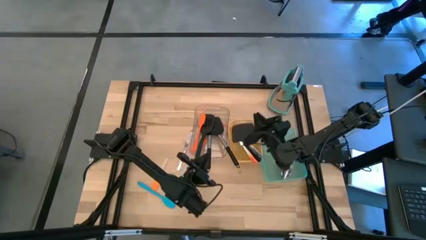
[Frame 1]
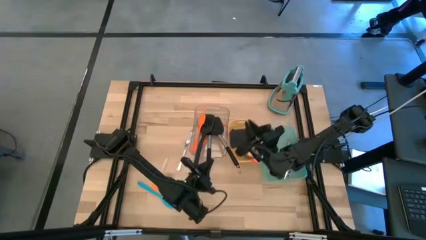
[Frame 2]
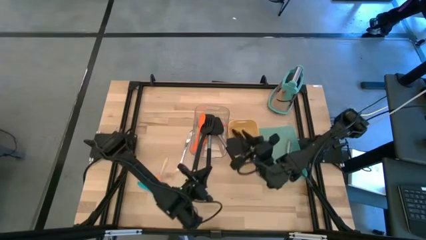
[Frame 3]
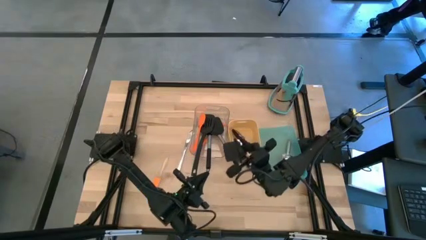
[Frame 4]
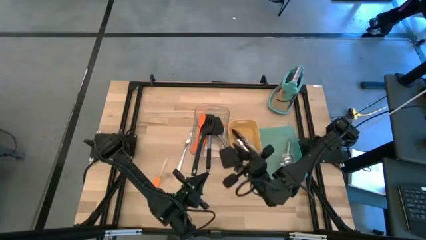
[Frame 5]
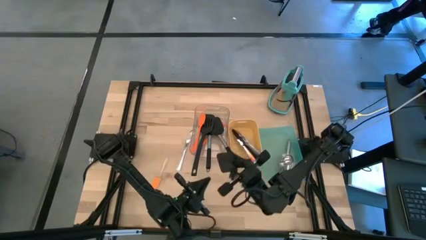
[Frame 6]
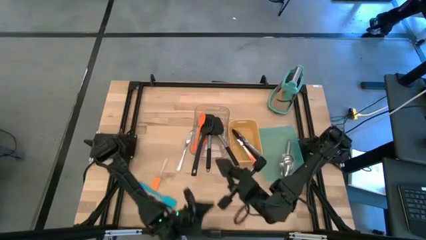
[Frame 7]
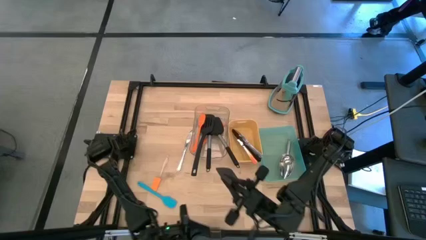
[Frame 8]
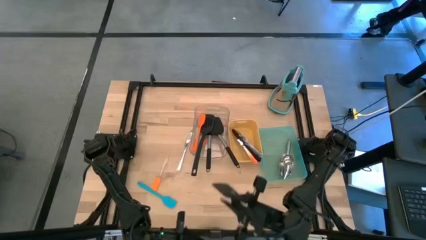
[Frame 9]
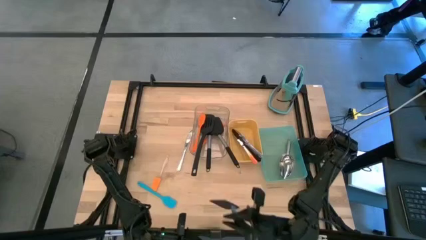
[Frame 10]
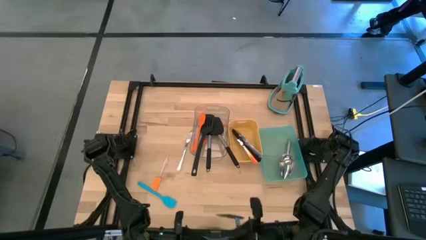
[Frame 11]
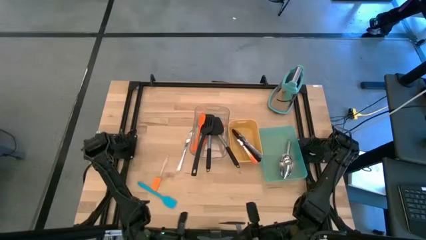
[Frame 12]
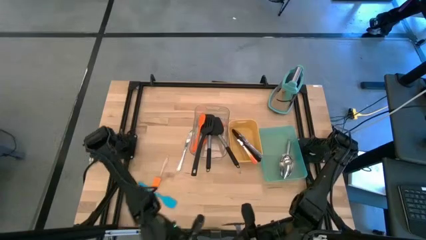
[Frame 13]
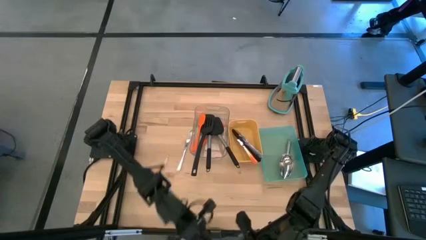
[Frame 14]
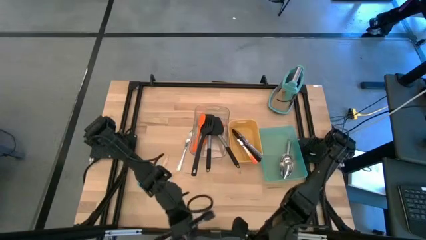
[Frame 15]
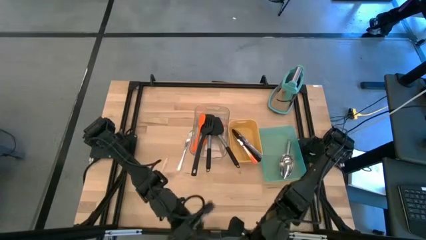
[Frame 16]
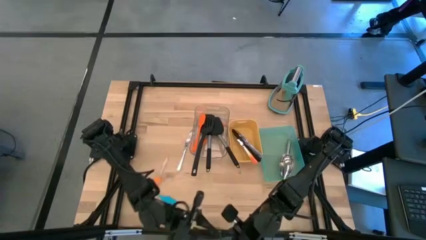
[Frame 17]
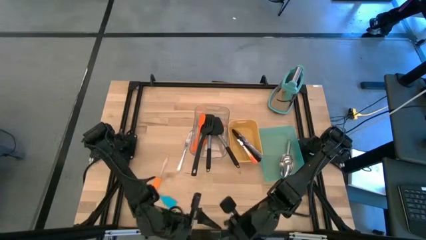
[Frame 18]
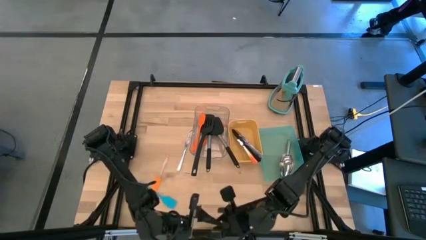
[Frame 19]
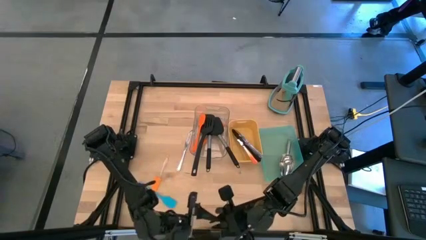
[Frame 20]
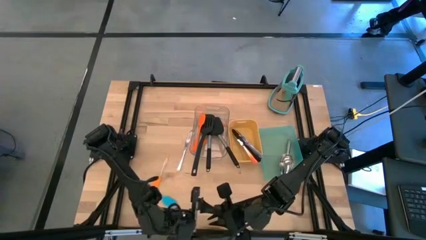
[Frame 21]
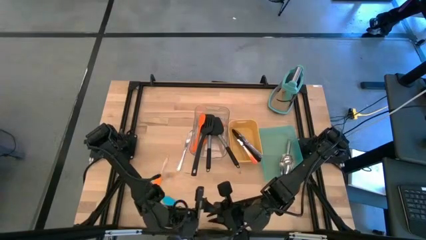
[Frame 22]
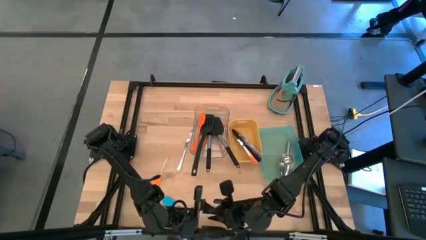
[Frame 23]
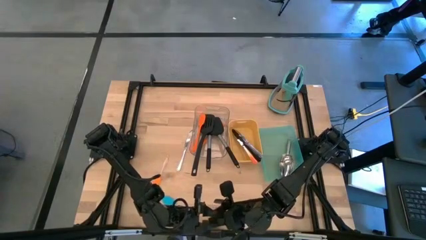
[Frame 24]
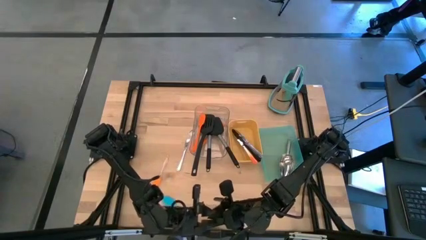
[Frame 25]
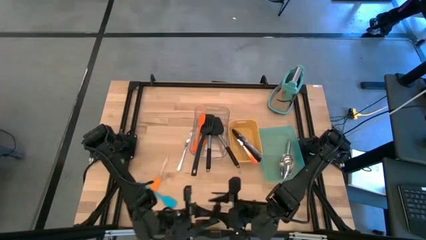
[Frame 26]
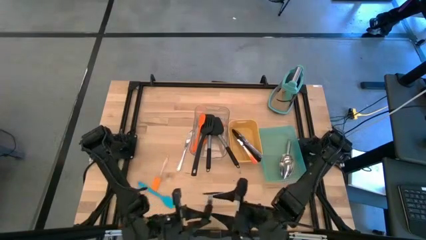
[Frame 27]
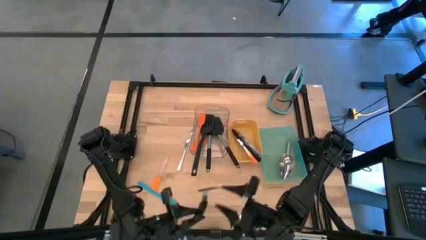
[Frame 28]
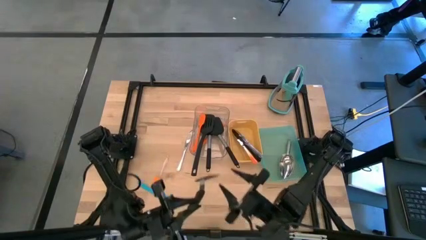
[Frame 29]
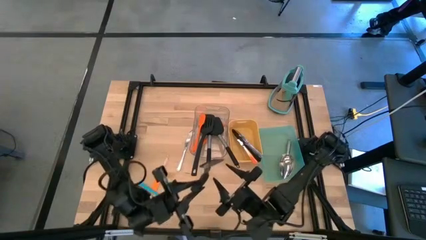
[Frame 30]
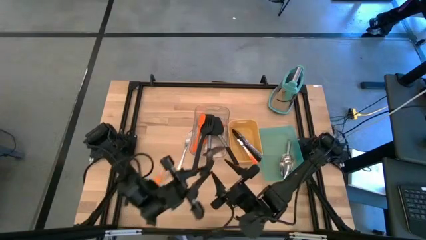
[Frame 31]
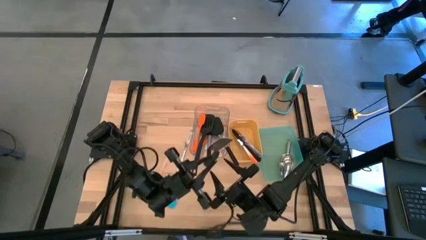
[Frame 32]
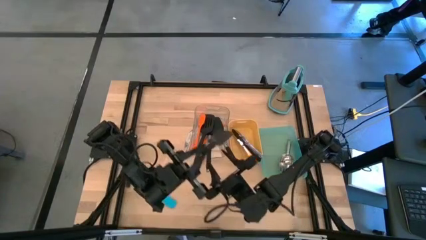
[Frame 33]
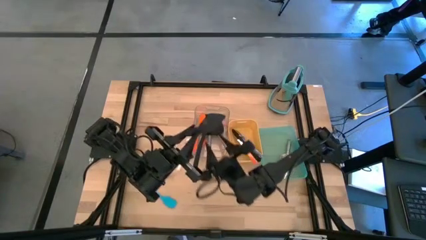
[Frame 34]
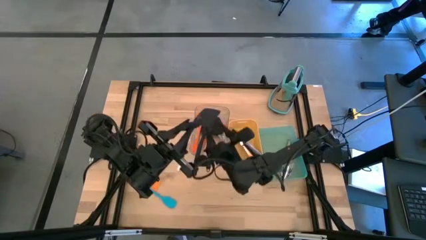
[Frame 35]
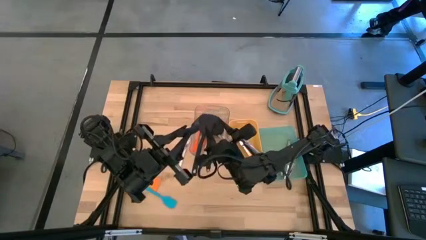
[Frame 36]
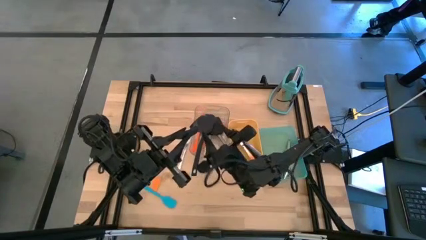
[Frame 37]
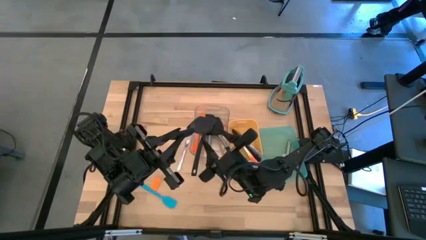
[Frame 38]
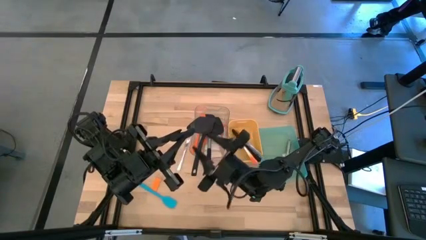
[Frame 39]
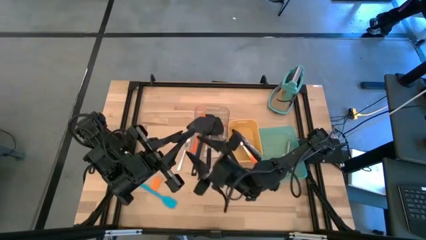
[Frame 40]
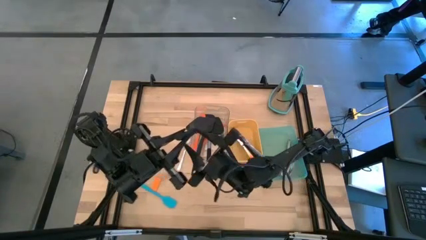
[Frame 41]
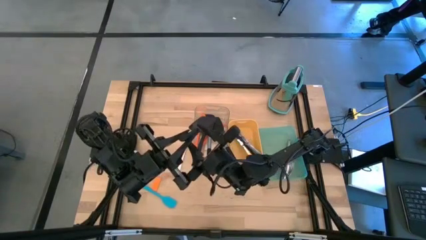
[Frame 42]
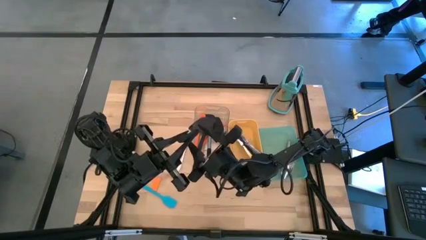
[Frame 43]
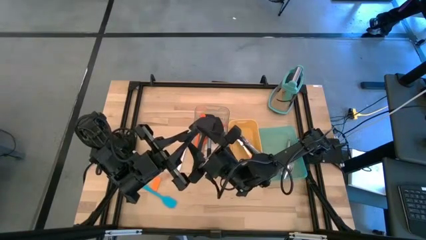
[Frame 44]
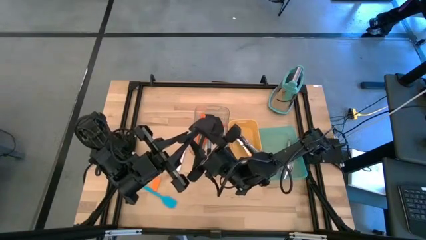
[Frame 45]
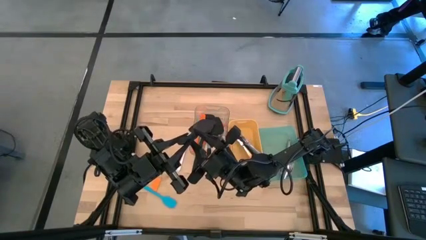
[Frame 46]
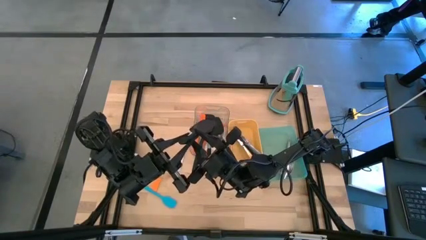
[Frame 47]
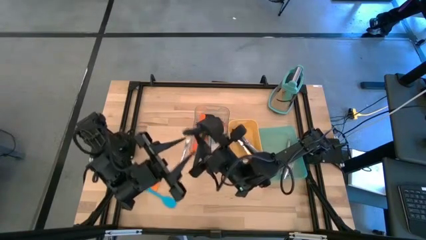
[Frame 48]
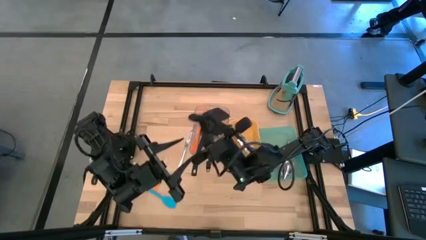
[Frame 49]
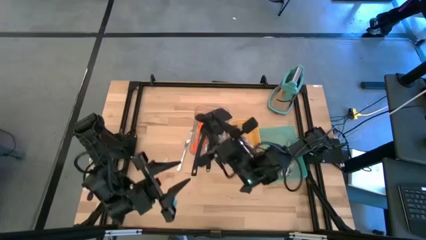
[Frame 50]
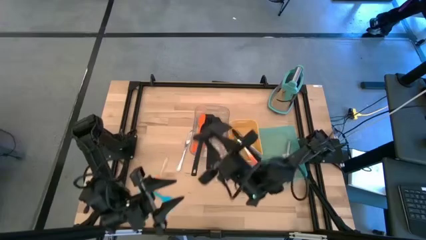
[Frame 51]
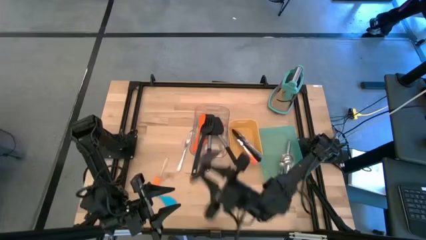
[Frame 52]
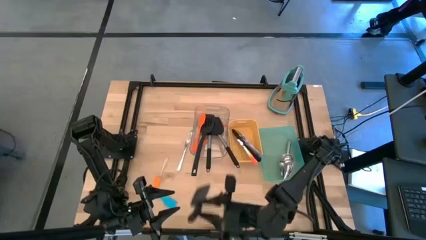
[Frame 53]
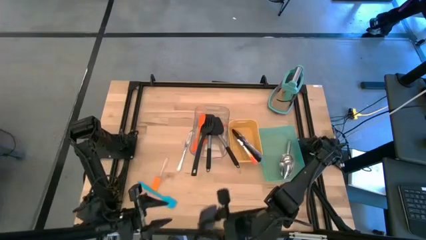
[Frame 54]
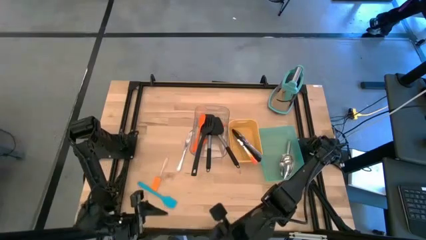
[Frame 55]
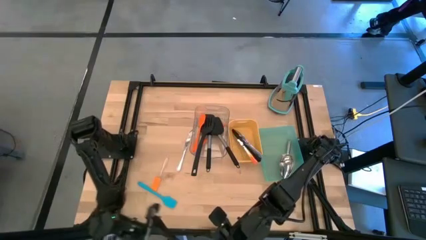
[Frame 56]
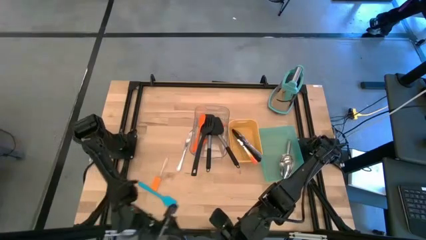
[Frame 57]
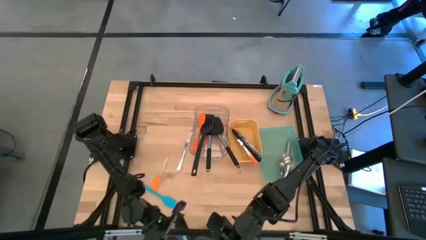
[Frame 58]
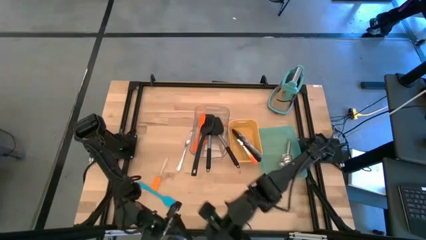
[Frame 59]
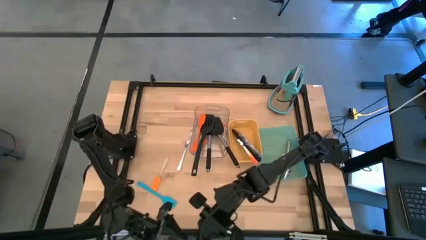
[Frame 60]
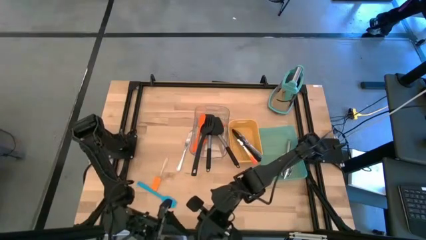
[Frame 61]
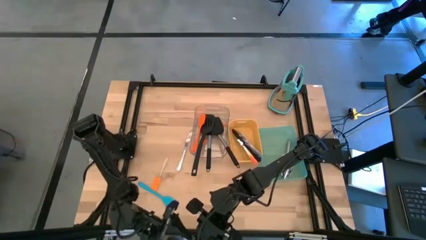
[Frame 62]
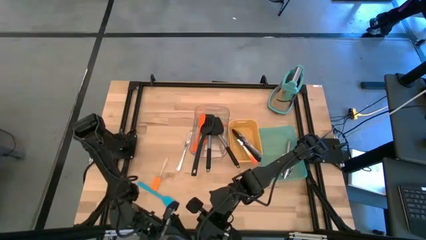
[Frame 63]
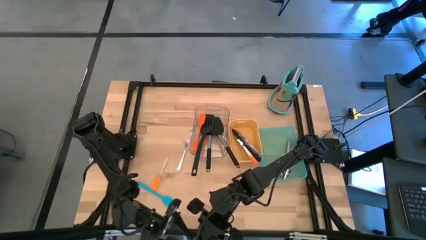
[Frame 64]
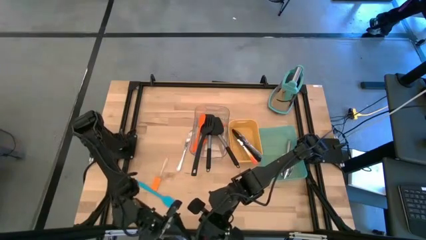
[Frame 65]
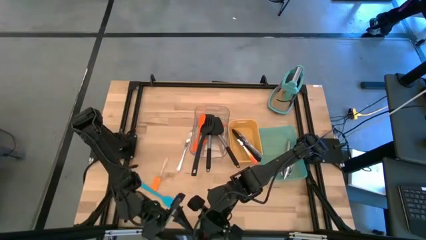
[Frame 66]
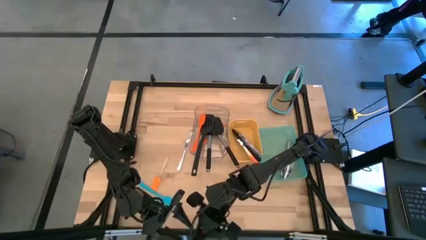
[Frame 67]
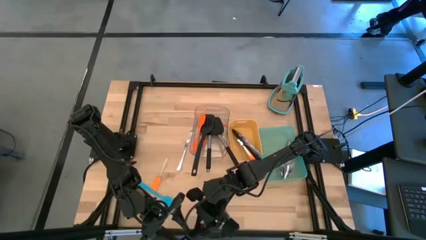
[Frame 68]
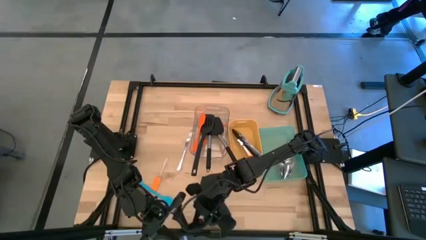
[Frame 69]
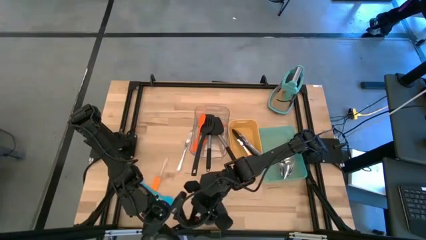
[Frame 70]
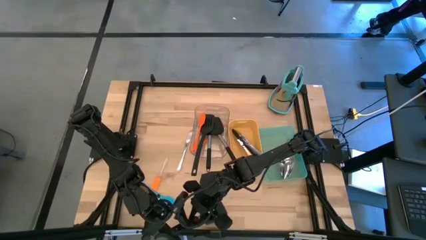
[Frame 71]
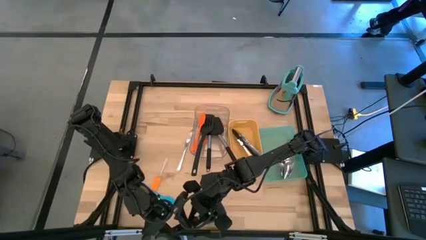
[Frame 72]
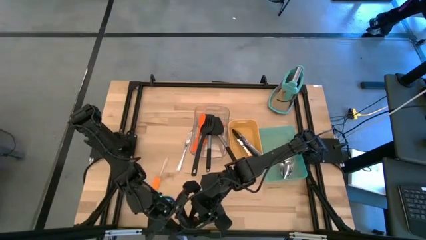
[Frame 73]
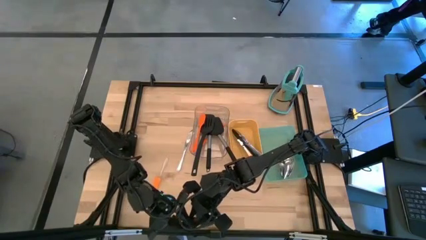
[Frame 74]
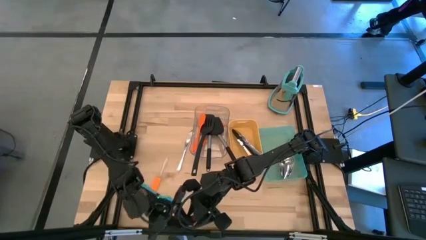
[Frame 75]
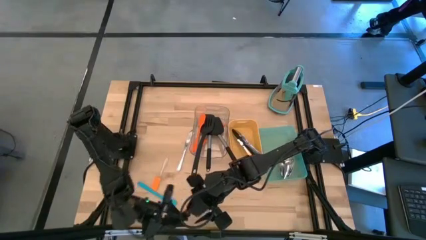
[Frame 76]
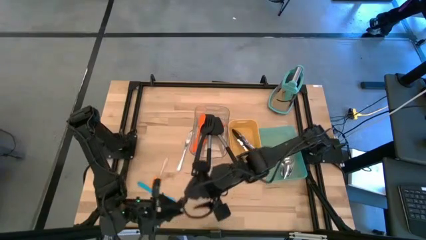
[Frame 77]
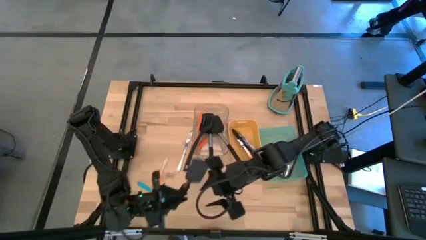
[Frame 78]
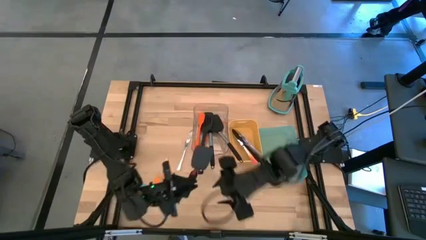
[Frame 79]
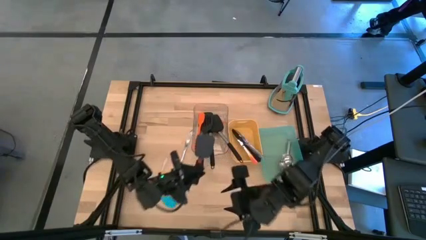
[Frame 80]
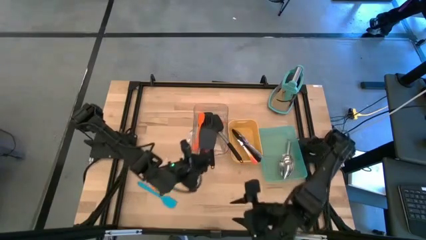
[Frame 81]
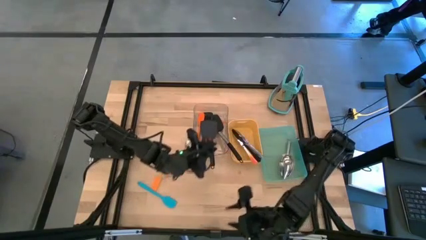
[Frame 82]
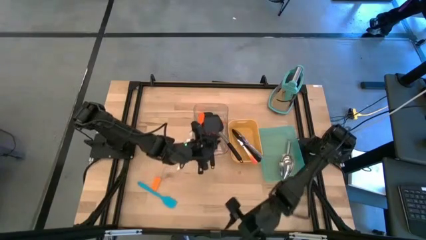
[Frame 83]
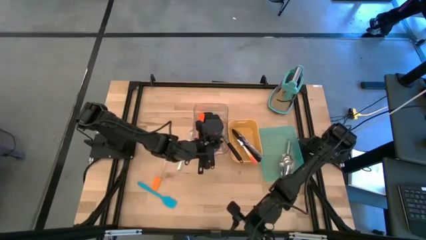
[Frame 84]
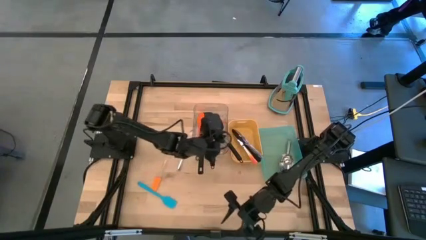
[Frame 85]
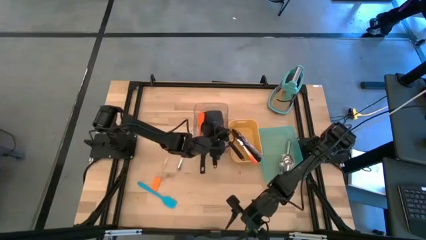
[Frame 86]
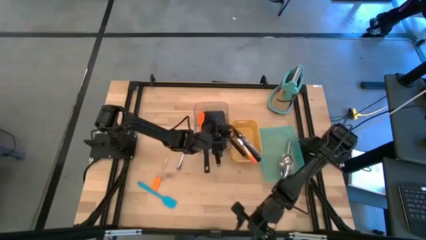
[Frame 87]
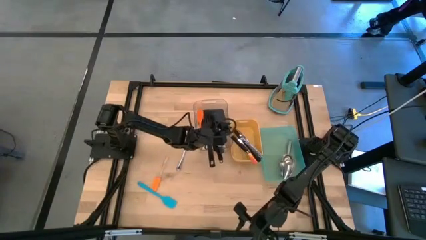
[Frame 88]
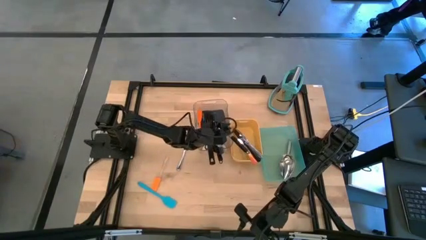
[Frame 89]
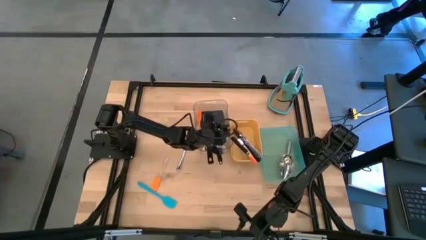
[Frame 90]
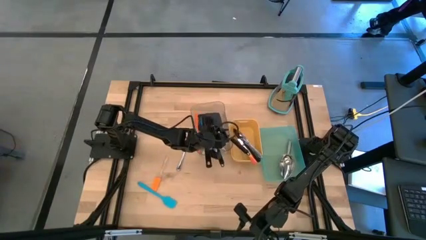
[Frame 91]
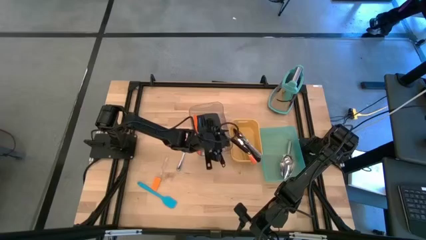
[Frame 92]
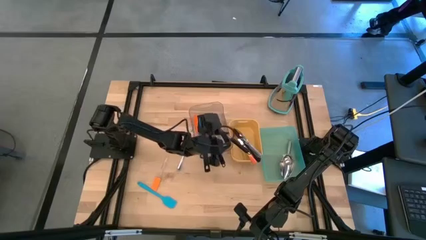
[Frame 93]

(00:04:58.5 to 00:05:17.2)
Task: Pick & Place Kitchen Items
Put the black spatula into the transparent bin
